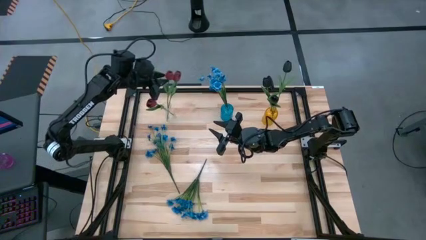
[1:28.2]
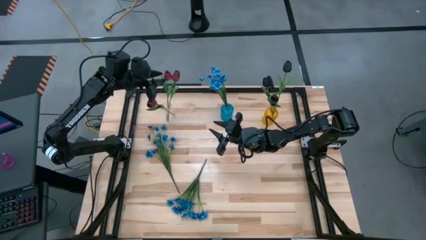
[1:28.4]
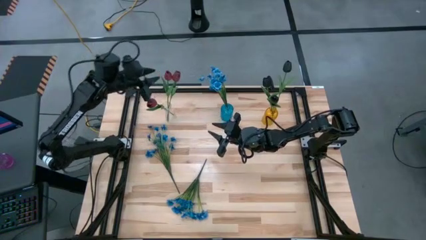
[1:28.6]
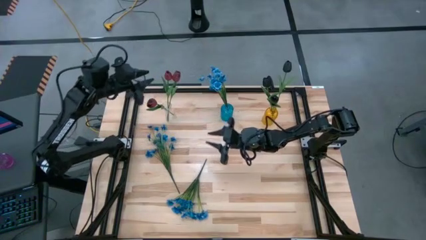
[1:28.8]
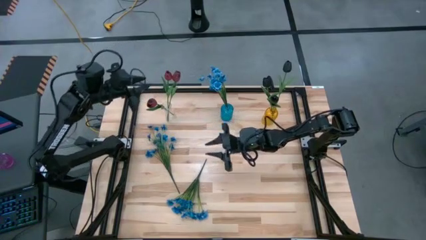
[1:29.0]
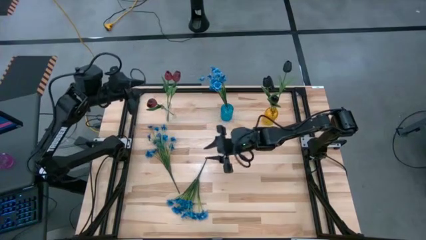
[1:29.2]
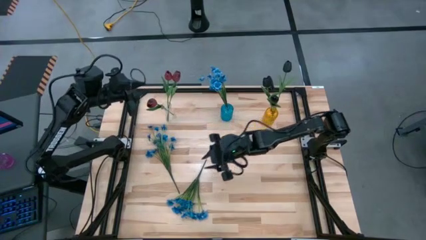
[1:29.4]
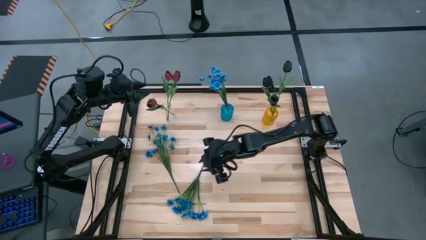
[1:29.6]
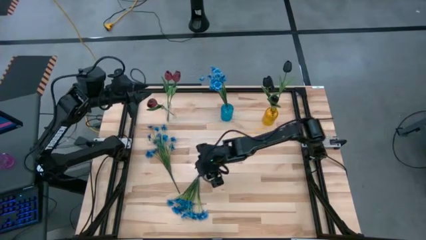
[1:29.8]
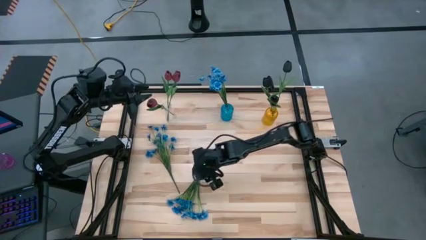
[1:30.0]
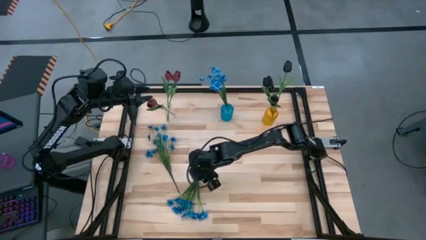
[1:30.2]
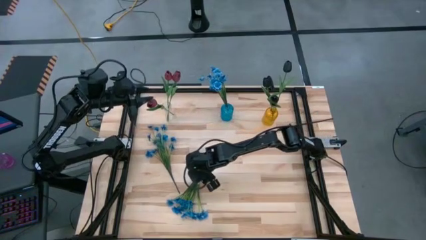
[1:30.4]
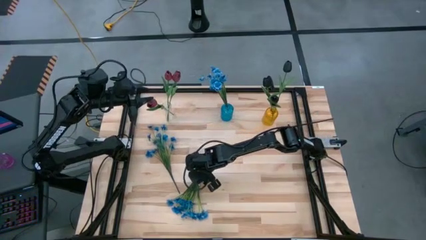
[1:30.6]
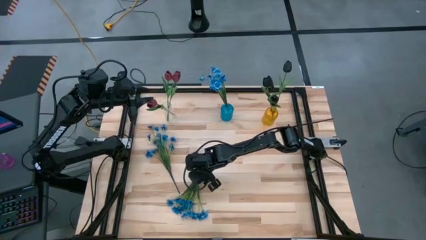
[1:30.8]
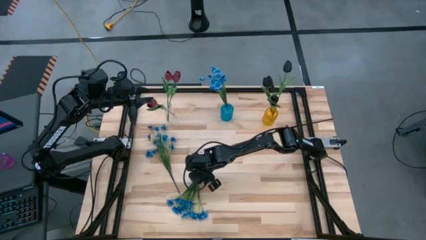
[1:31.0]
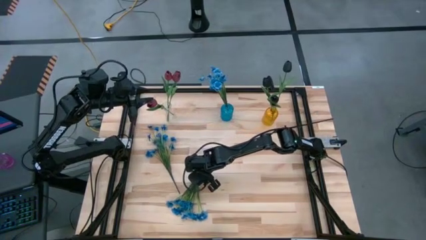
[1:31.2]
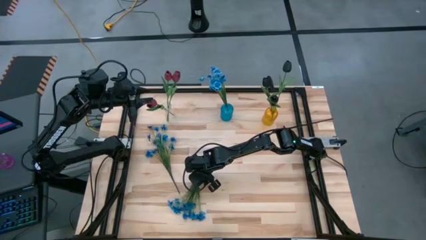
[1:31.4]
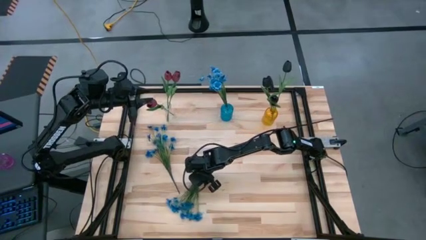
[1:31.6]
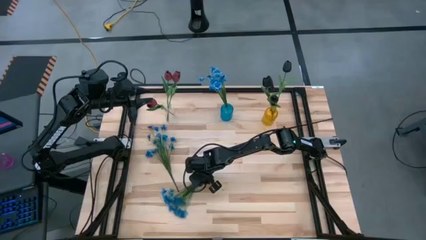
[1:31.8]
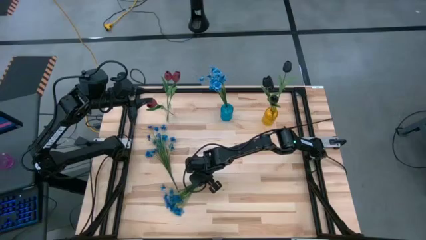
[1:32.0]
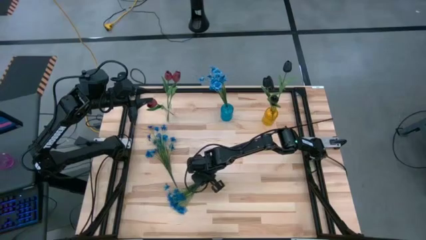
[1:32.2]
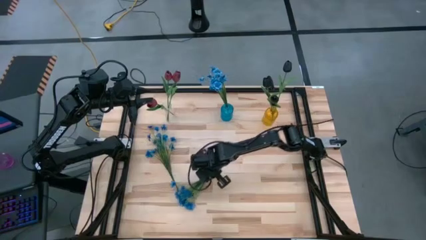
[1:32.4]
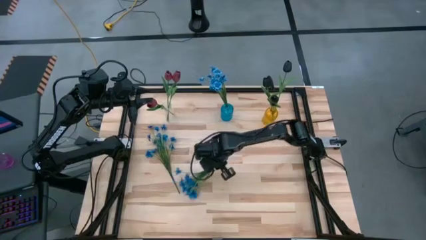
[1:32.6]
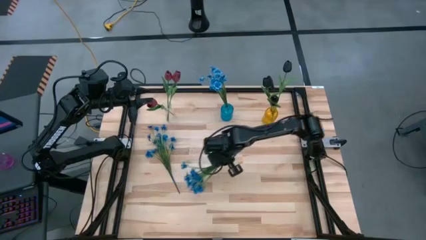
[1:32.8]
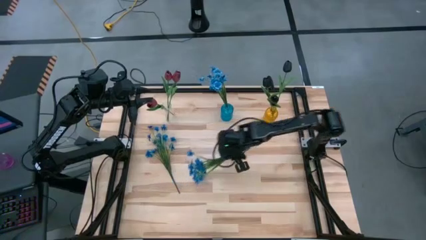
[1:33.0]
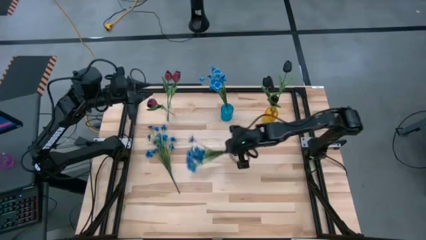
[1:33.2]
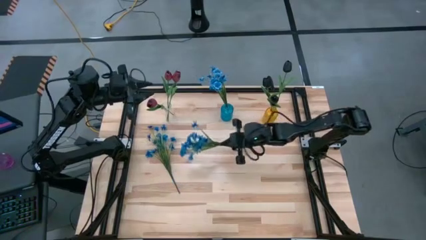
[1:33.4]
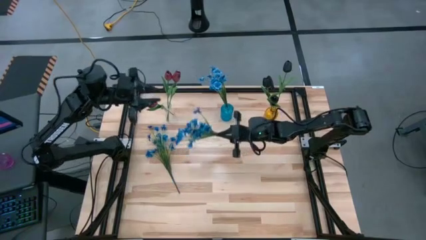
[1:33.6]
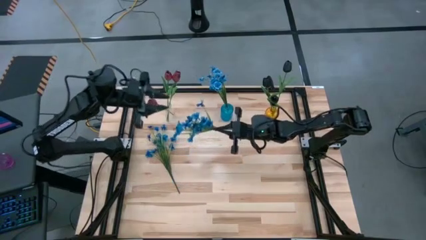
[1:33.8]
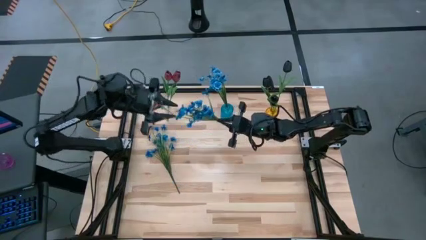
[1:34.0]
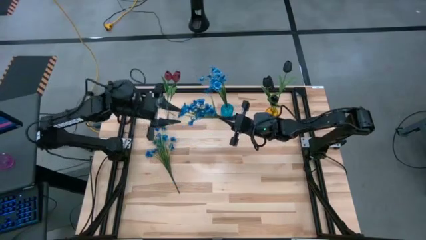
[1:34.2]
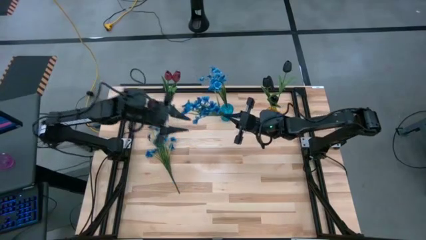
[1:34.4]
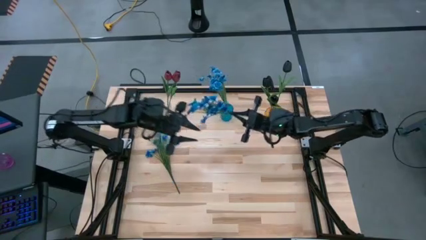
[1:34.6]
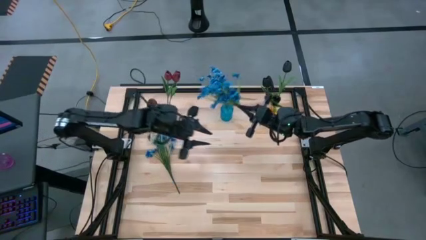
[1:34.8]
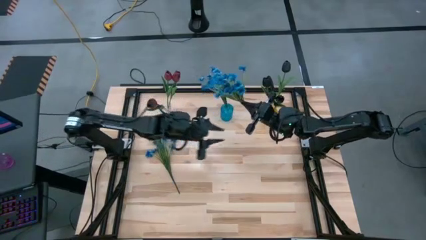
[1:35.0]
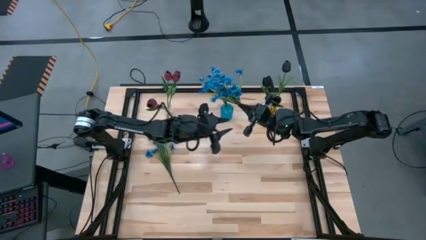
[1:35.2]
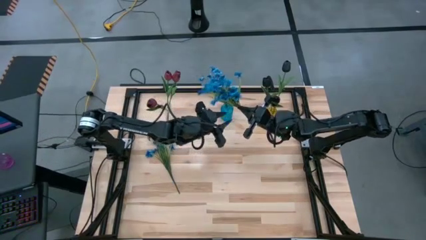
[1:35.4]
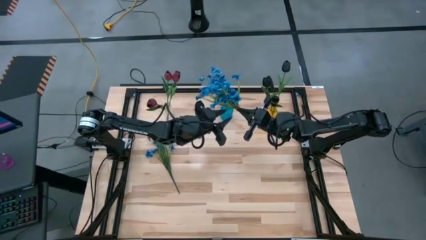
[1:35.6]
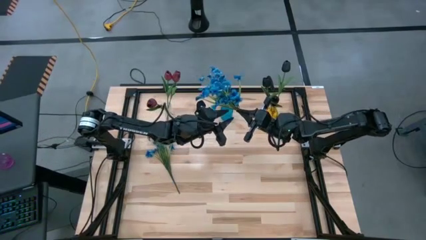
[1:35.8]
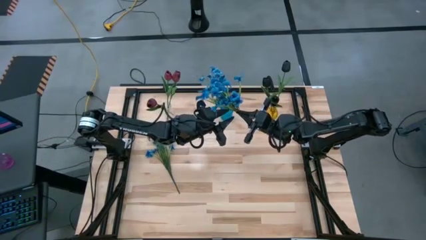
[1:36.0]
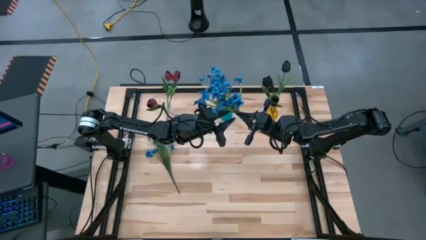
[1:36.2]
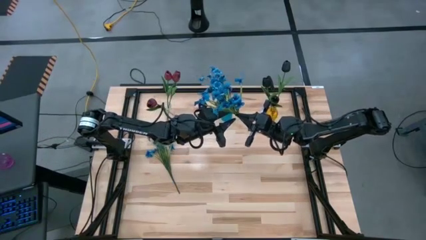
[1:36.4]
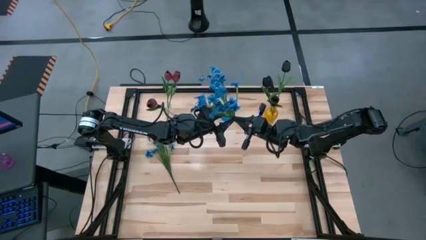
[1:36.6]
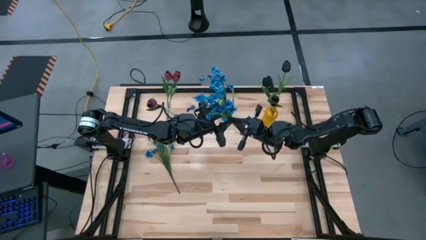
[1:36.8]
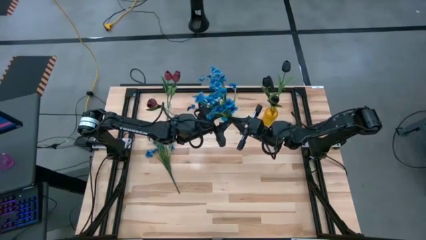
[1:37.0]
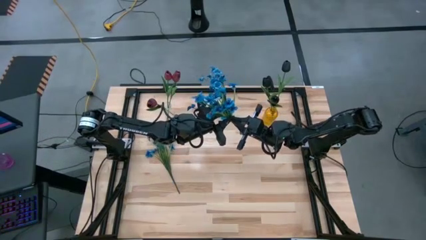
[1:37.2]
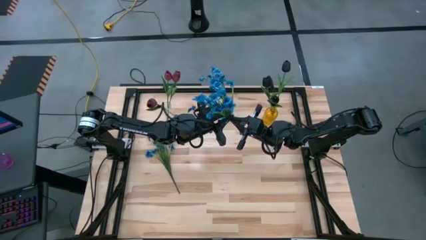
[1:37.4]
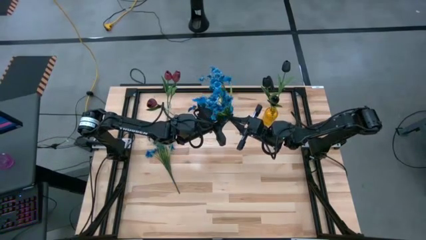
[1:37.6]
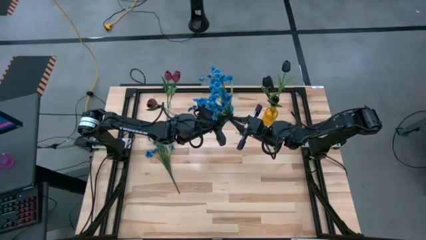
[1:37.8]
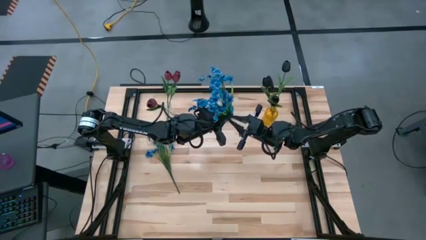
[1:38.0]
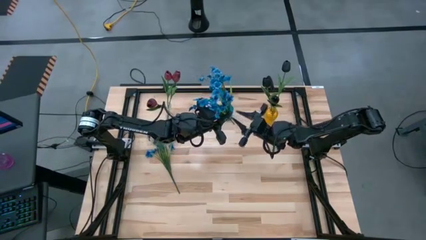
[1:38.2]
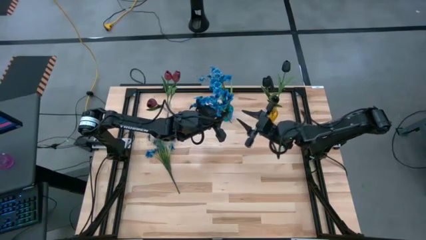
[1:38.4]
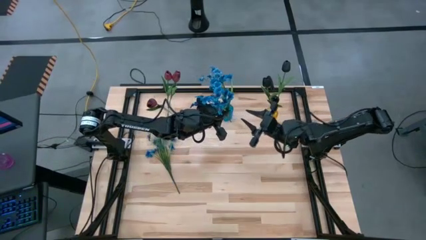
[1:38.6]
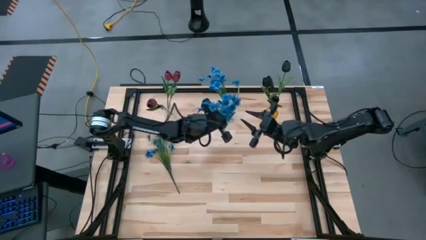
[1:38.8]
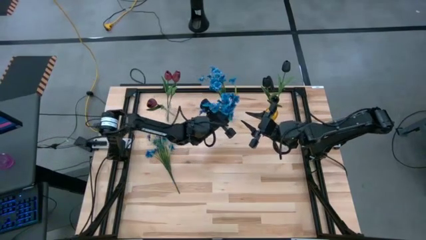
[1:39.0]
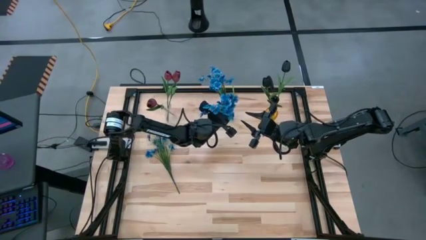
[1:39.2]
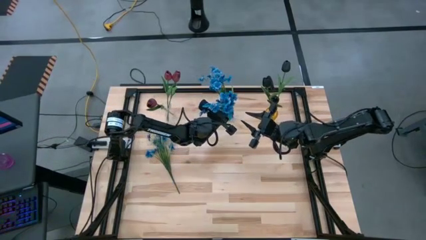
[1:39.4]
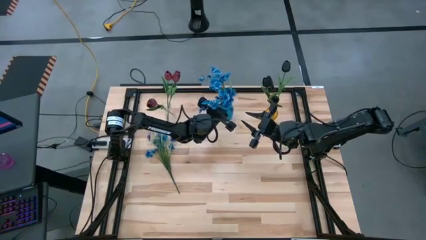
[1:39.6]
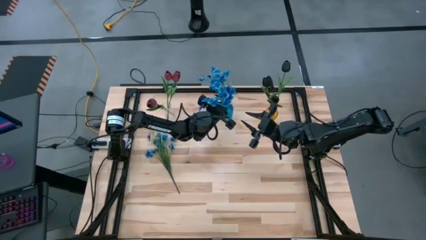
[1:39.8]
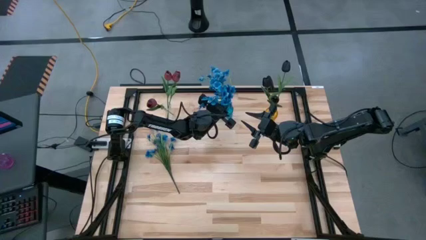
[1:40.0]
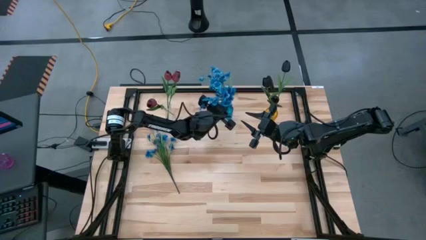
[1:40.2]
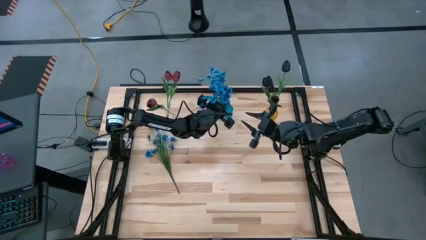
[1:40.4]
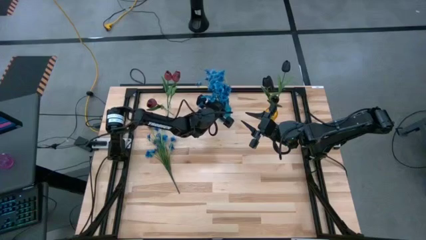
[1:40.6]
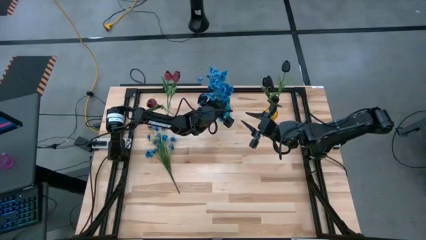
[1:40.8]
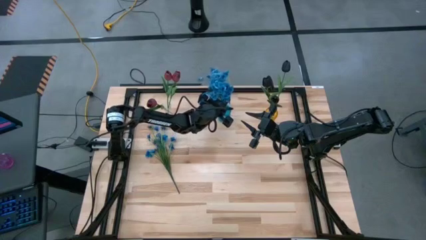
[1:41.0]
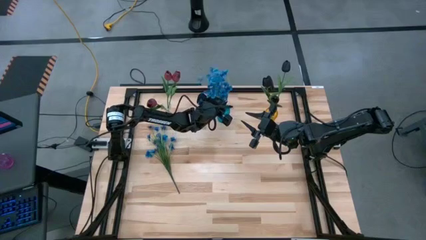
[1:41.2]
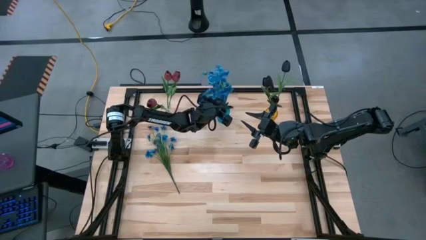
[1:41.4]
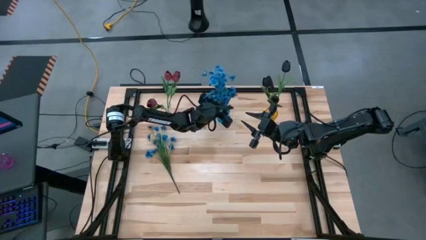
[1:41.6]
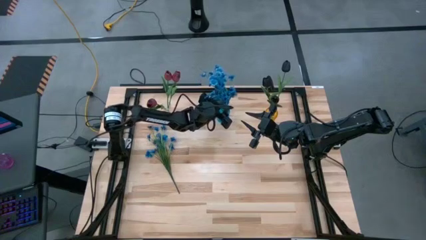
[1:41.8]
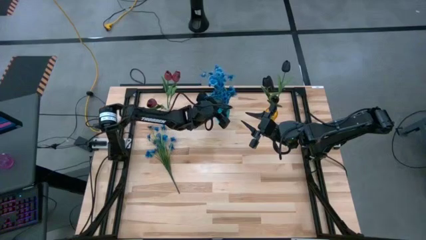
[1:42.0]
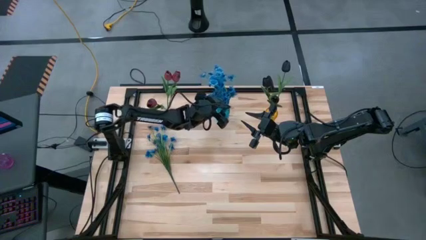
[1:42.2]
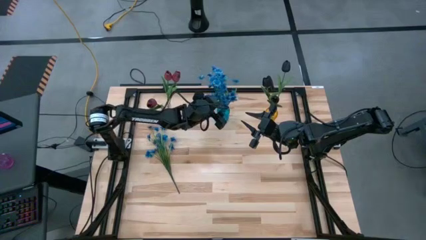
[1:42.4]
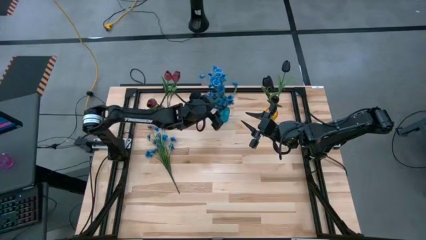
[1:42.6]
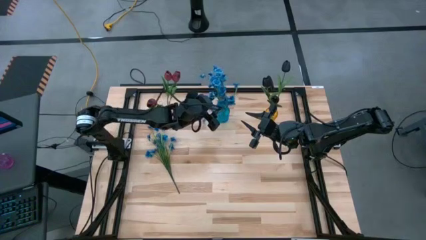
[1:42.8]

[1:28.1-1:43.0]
Task: Sort flowers into vase by color
Put the bottom blue flowers into the blue vase

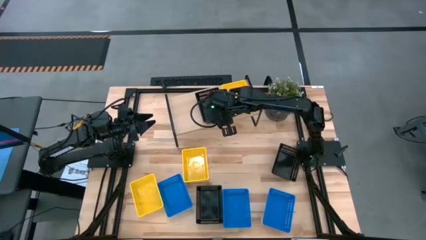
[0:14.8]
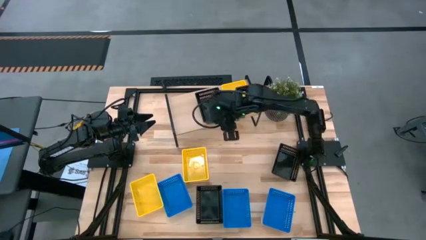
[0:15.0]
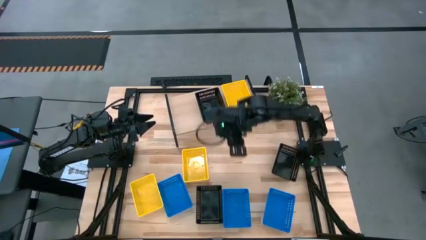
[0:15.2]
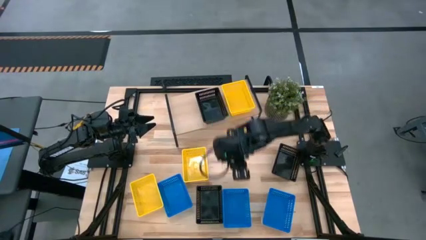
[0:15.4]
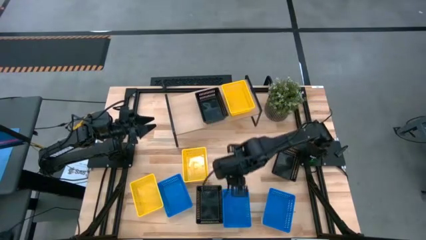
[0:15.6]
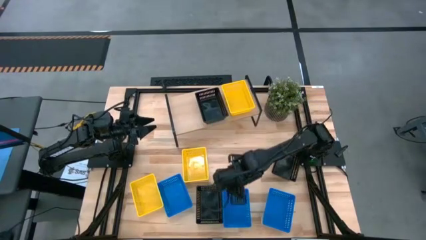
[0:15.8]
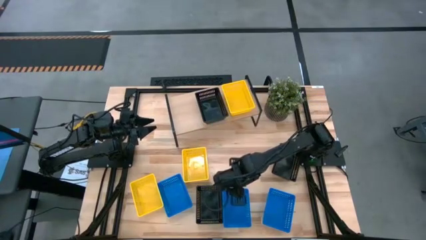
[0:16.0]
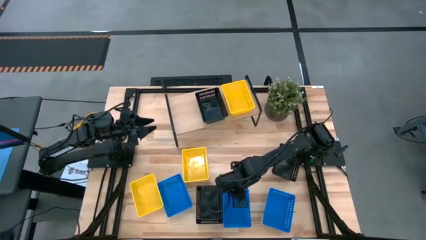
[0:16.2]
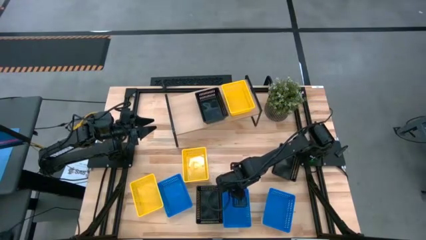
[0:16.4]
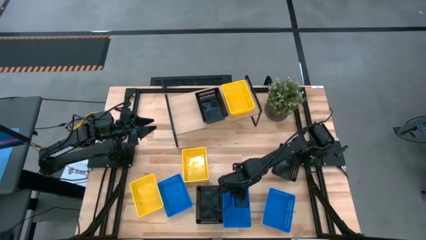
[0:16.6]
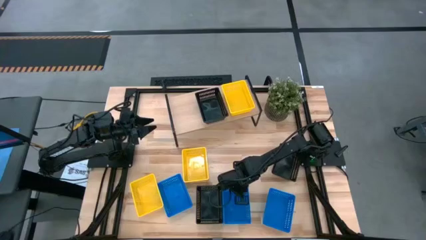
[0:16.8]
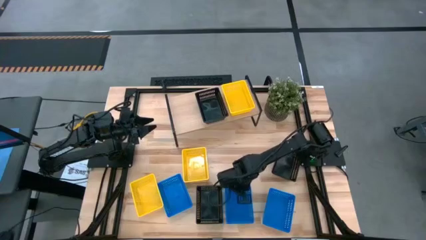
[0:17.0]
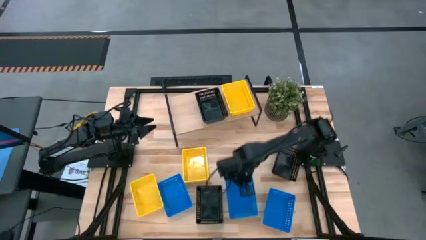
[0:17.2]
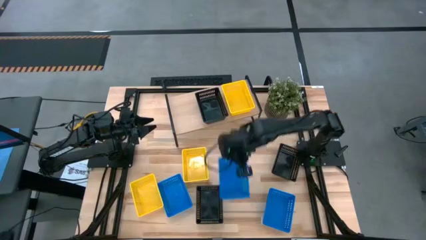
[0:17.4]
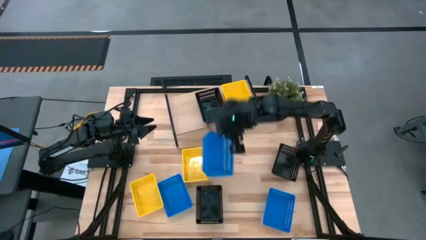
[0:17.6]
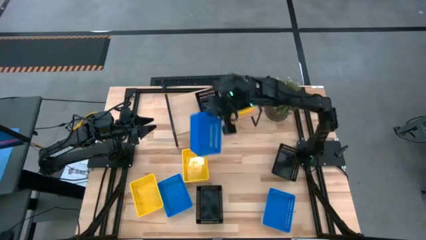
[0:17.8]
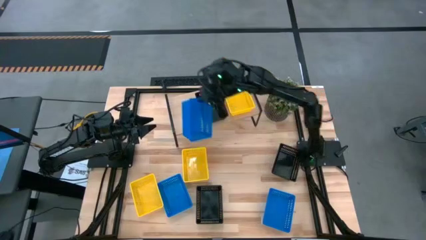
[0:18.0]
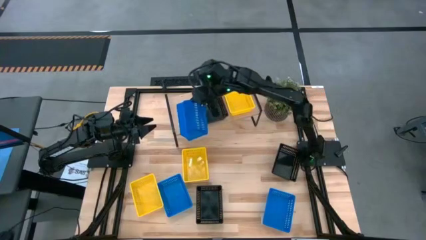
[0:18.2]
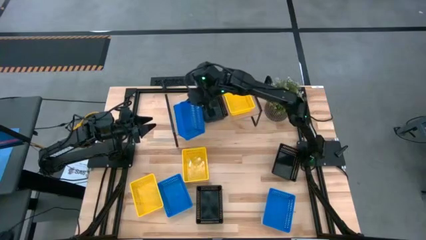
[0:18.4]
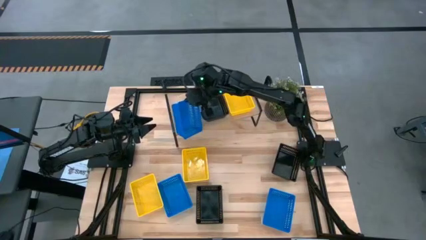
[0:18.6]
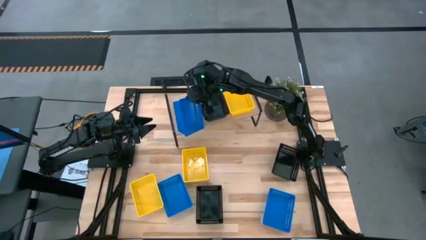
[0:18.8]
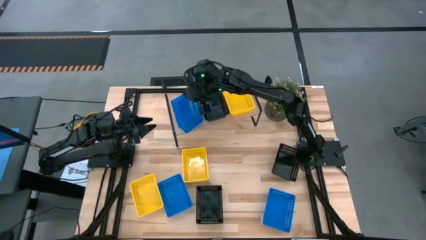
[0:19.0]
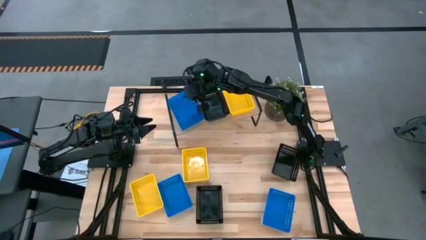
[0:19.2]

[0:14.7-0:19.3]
Task: Stack baskets on shelf by color
Put the middle blue bin on the shelf
